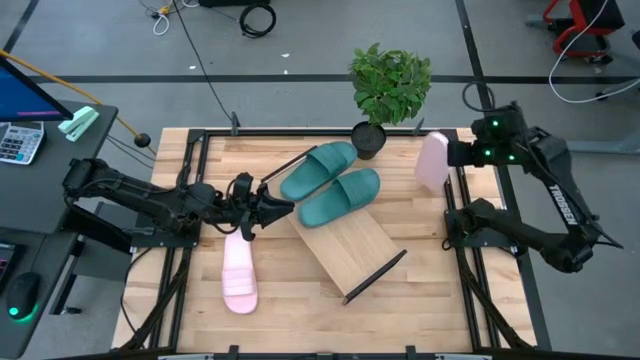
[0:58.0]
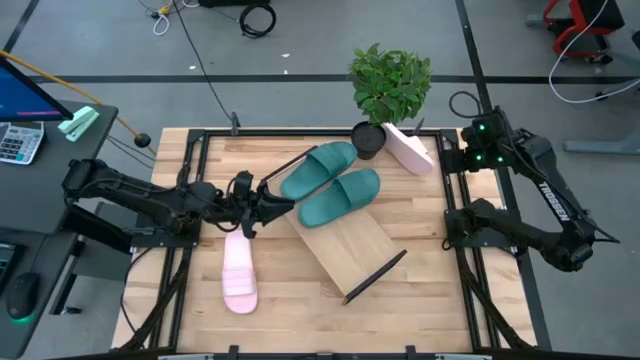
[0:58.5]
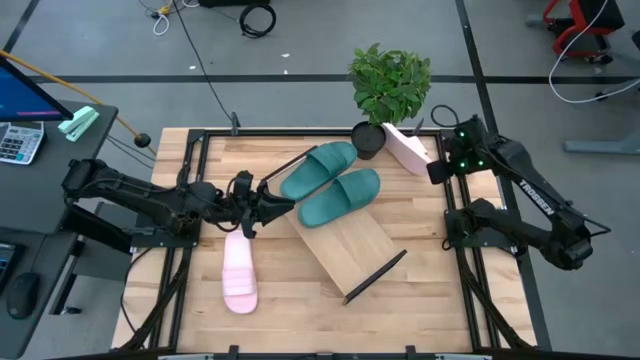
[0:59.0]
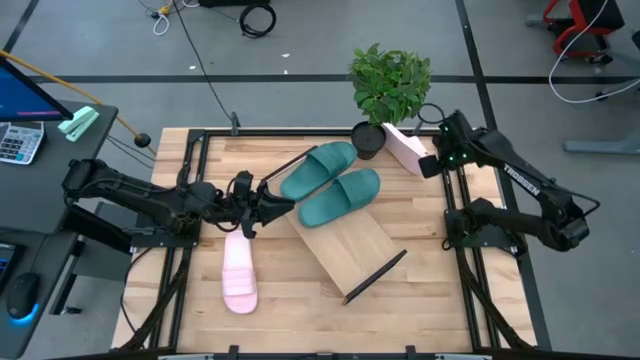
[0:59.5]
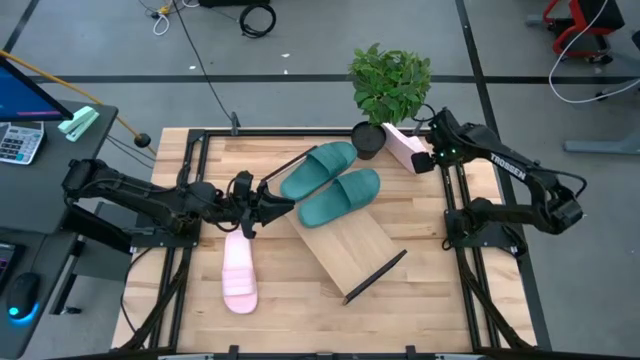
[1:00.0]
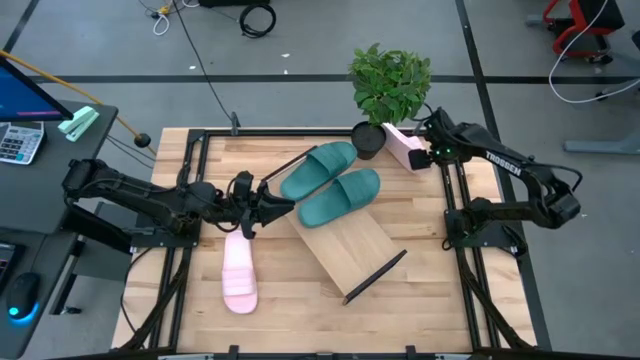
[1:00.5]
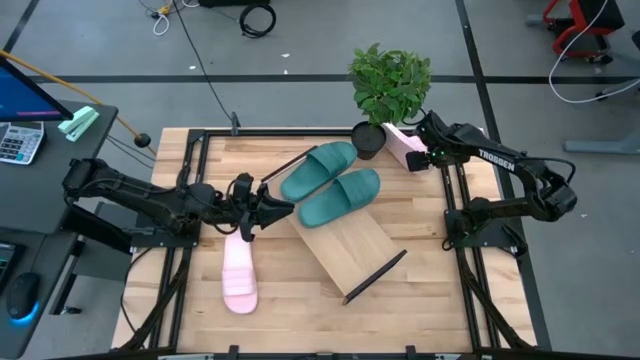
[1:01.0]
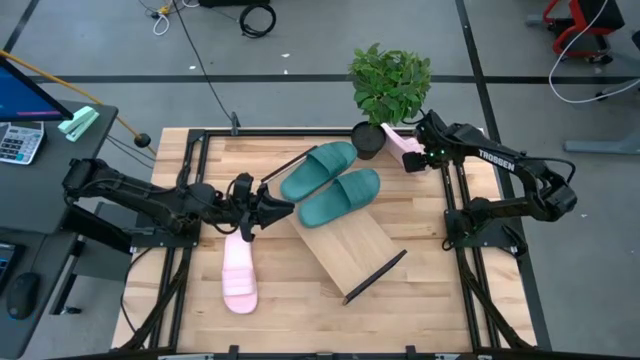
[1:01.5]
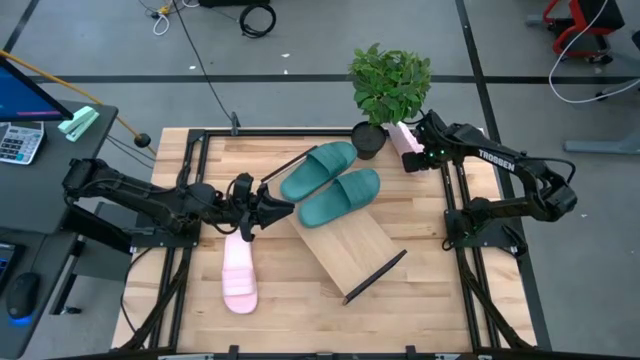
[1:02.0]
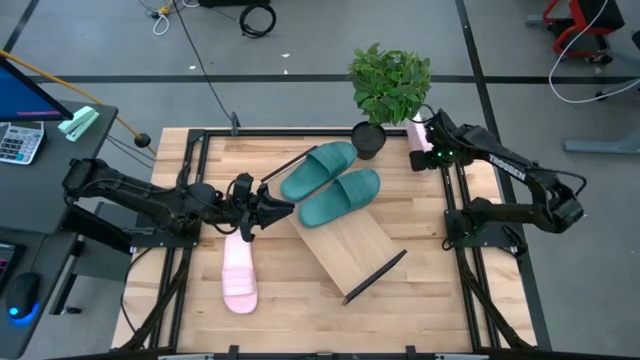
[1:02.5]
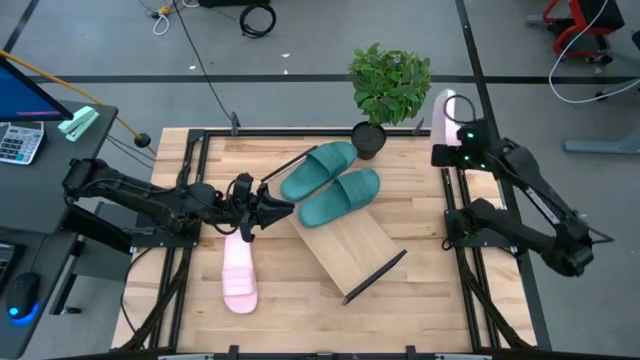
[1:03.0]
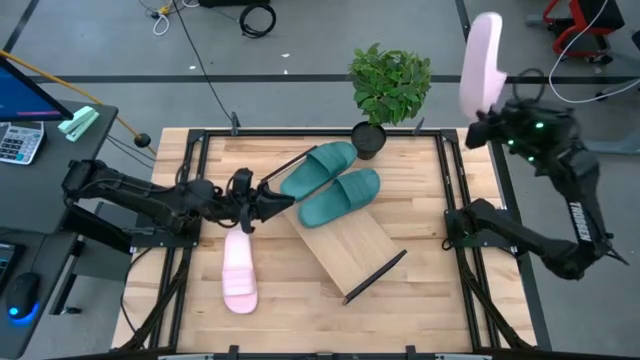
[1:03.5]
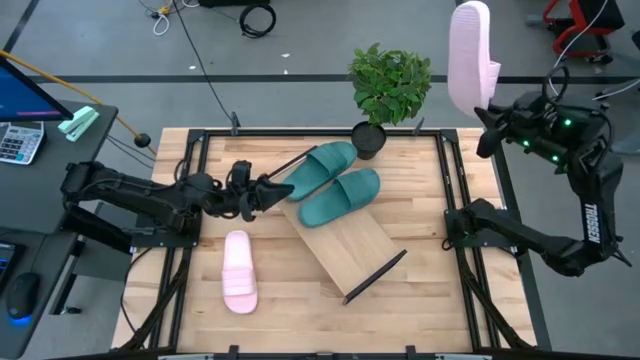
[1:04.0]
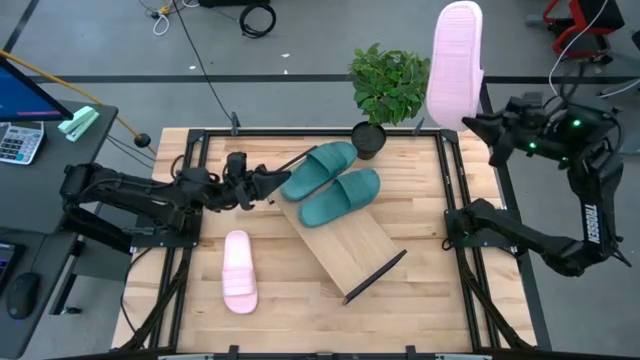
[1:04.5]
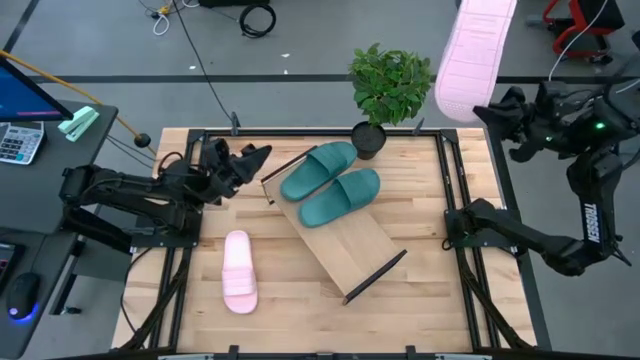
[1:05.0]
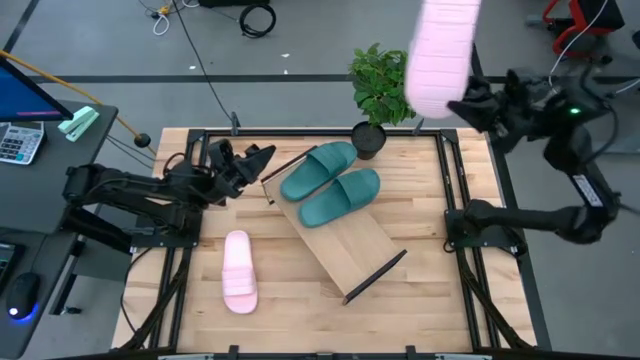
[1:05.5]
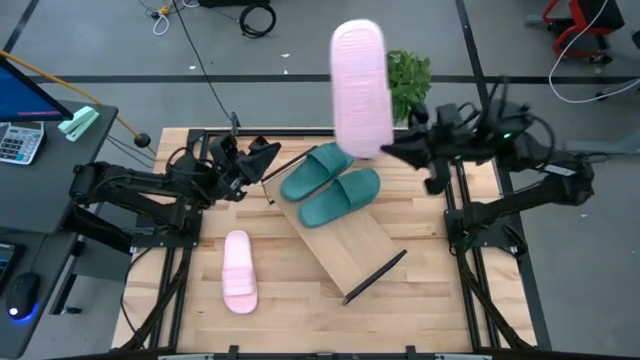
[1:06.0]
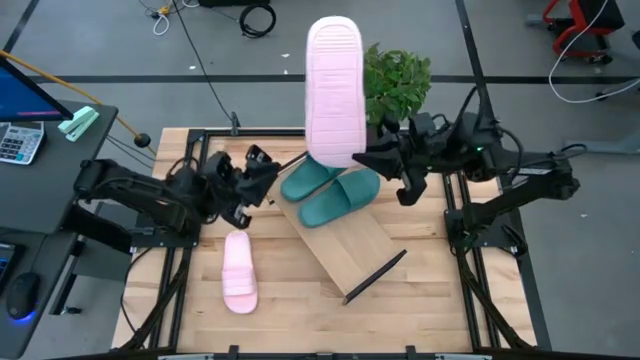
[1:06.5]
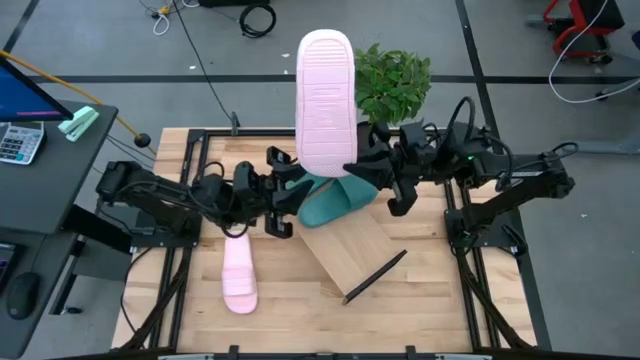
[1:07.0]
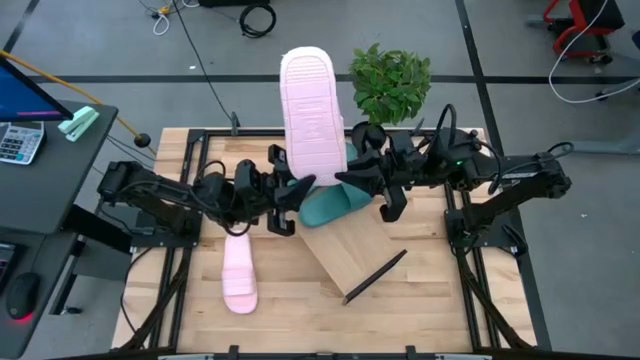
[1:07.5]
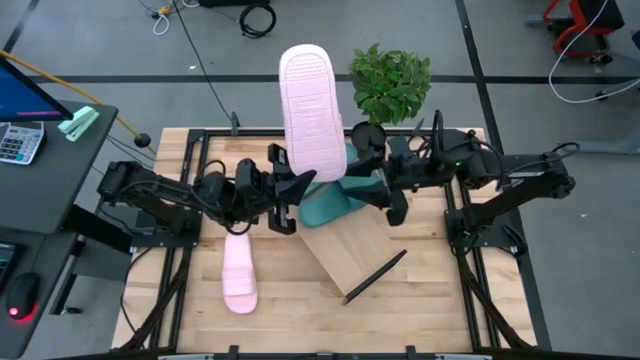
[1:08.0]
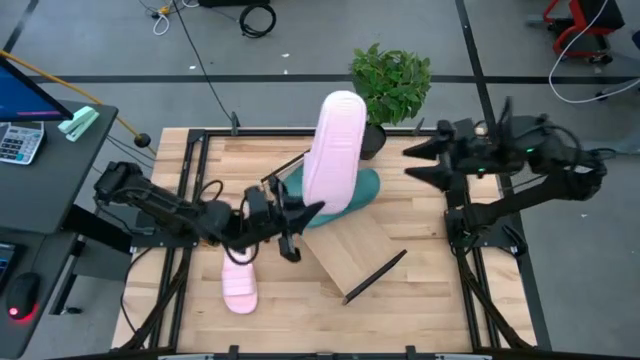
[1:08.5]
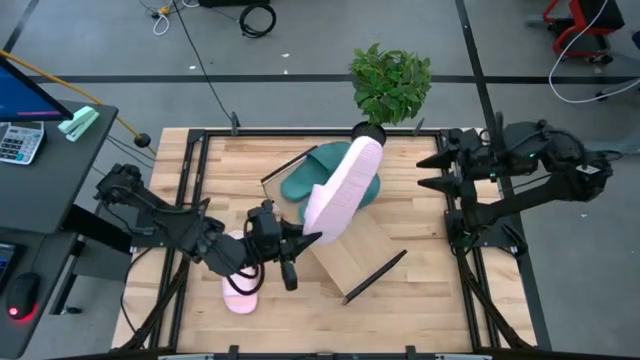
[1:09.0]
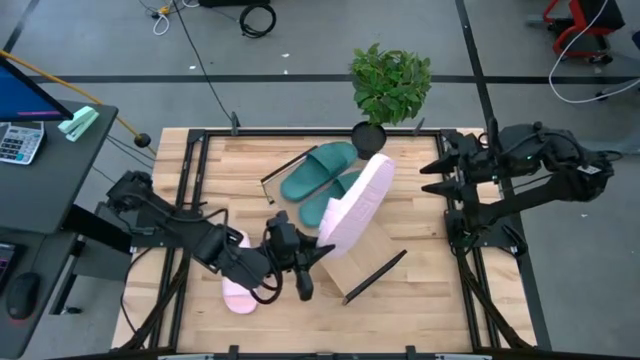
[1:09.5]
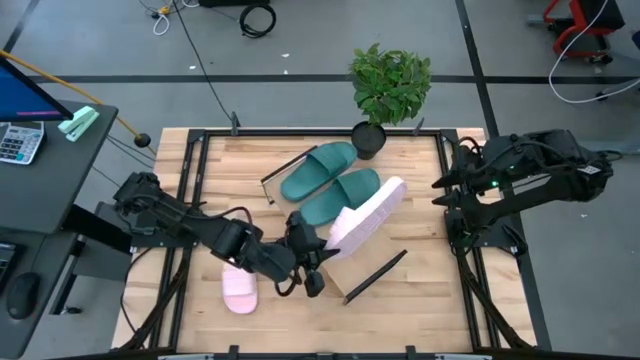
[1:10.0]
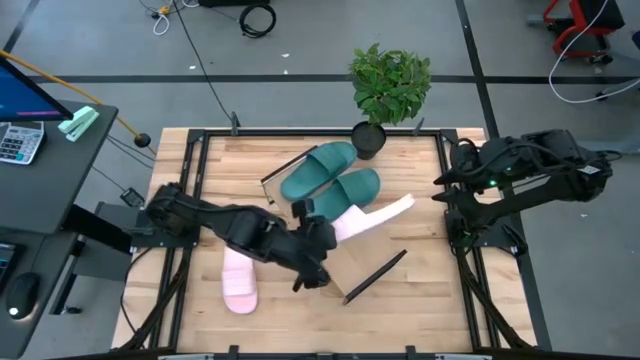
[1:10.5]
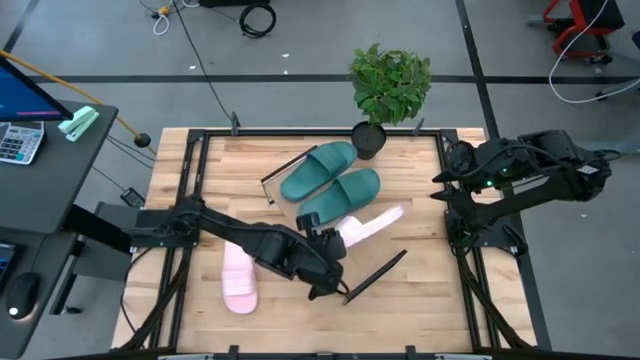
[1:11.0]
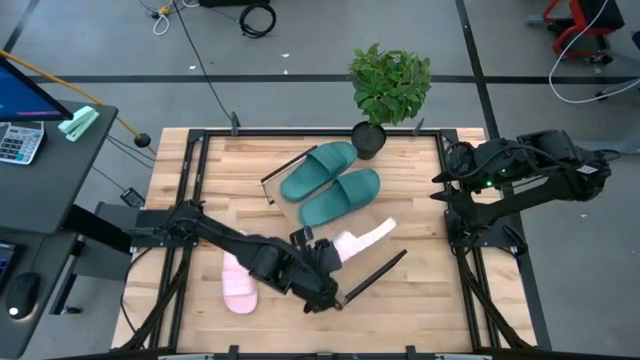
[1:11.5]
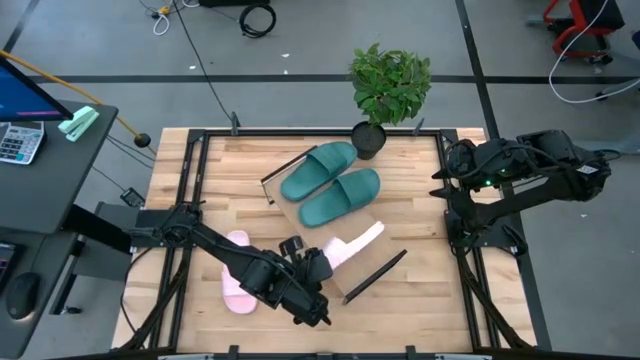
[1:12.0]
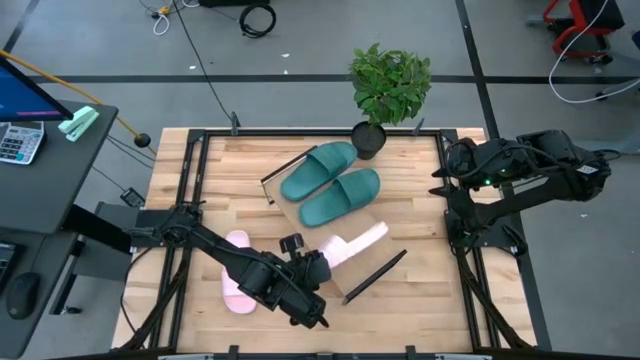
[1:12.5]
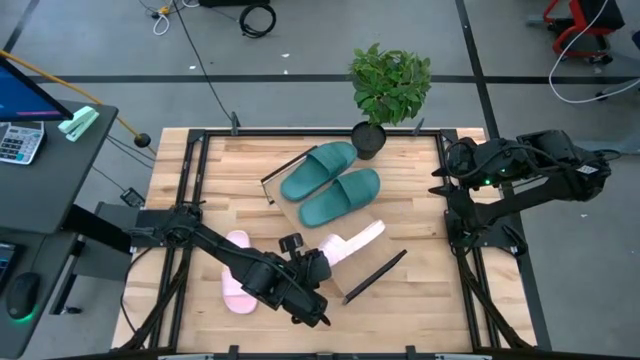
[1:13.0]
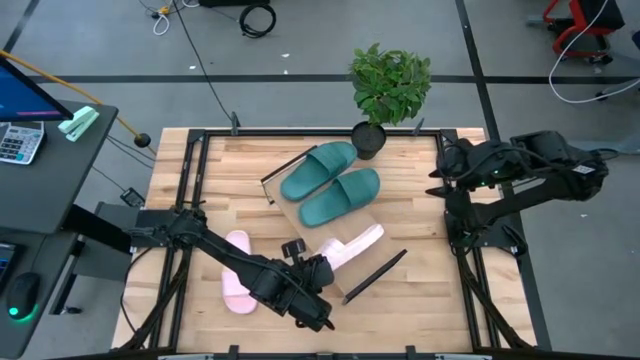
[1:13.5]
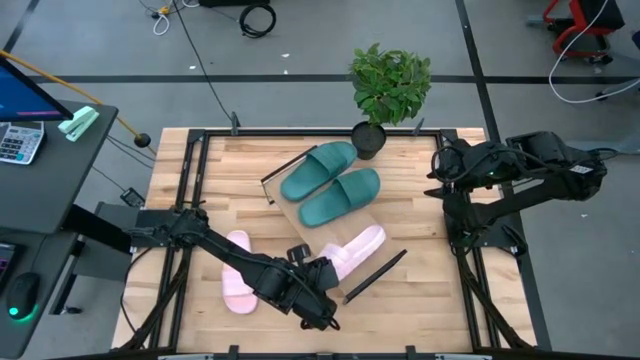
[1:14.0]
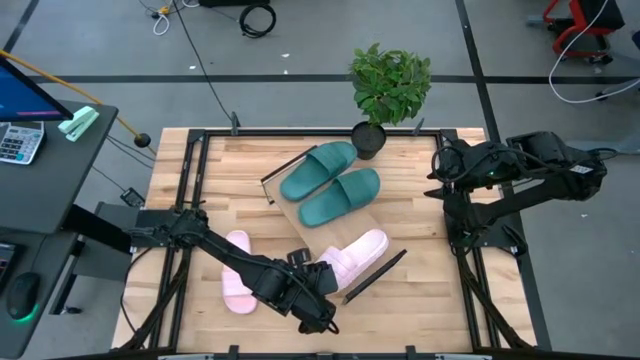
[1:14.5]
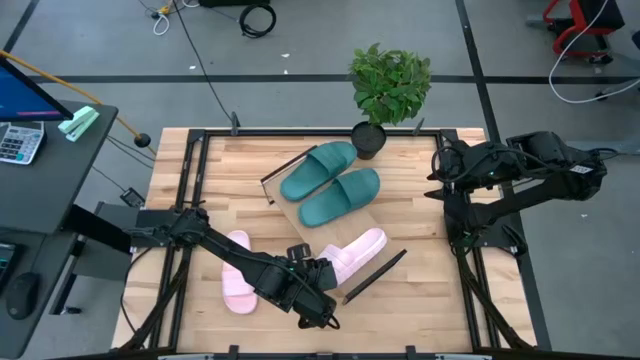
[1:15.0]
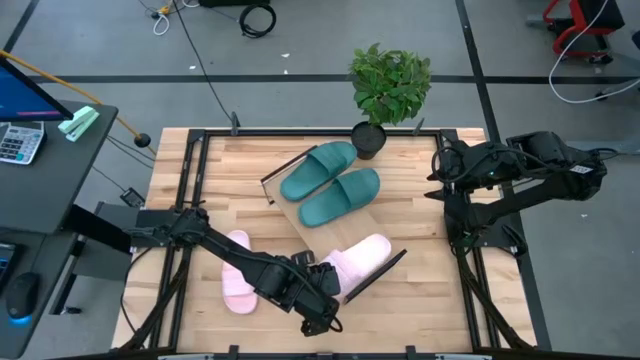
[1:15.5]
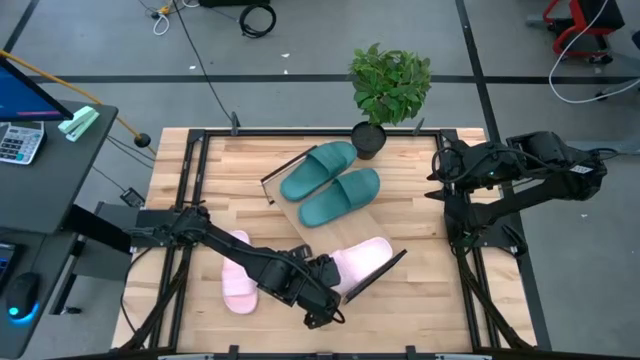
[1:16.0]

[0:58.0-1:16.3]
Task: Pick and place slides into the shelf
Put the right pink slide on the shelf

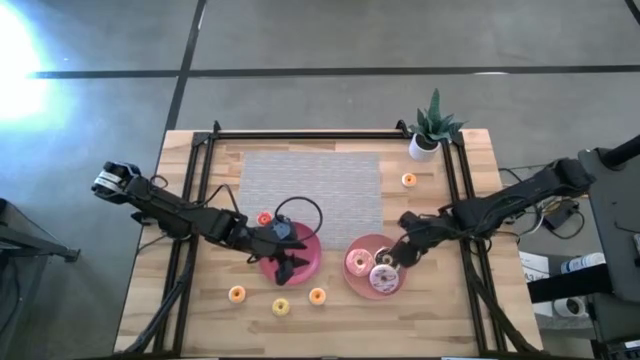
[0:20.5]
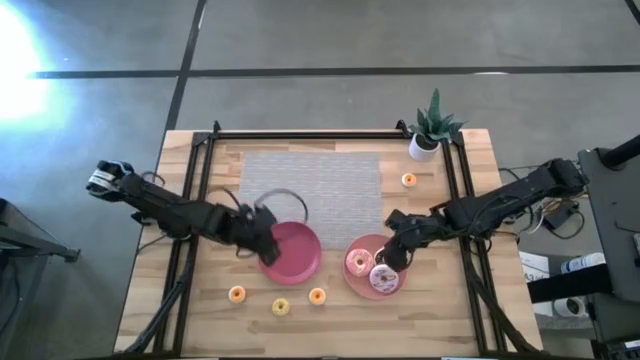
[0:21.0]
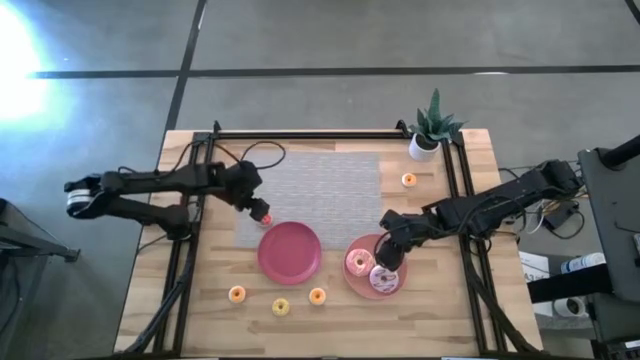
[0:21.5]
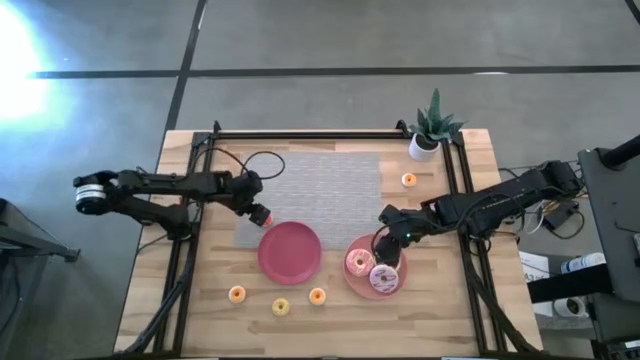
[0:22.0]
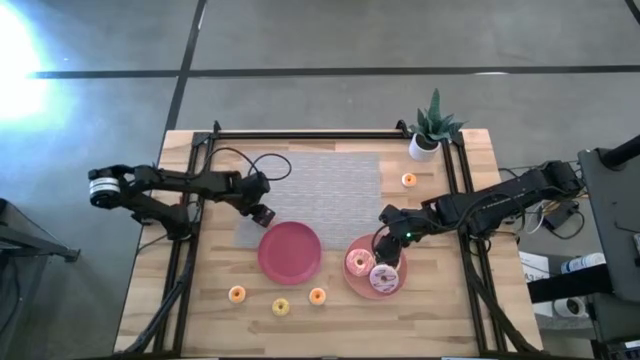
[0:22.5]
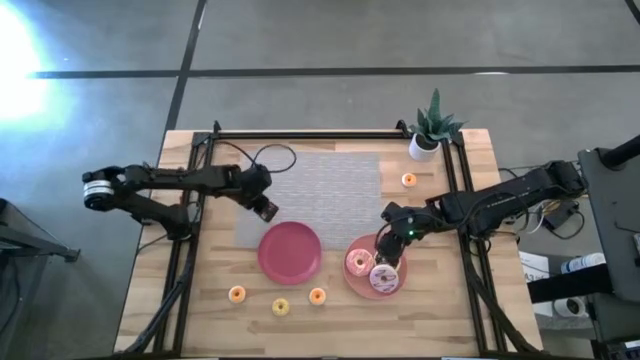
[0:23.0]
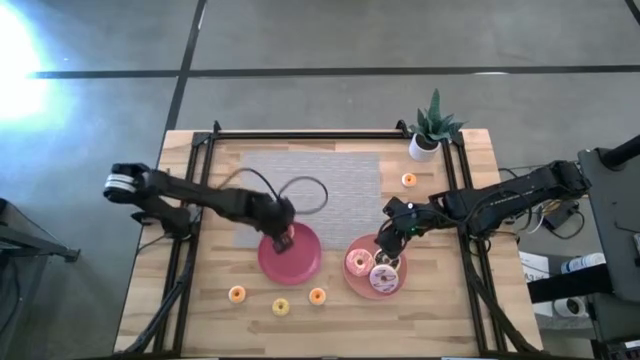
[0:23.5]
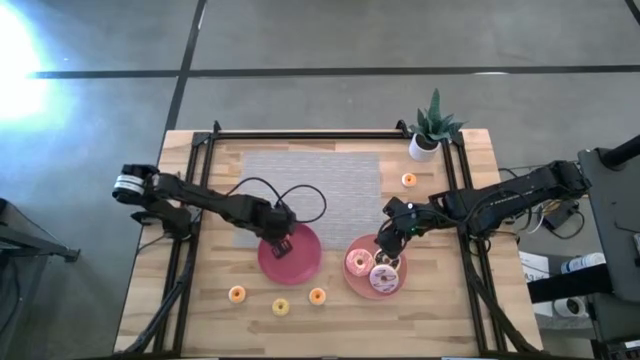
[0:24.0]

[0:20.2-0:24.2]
Task: Pick & Place donuts
Put the orange small donut on the dark pink plate
